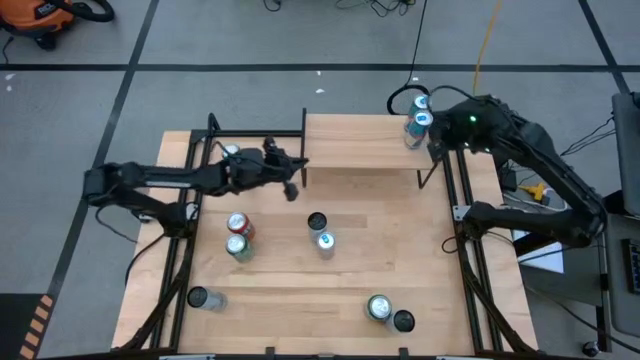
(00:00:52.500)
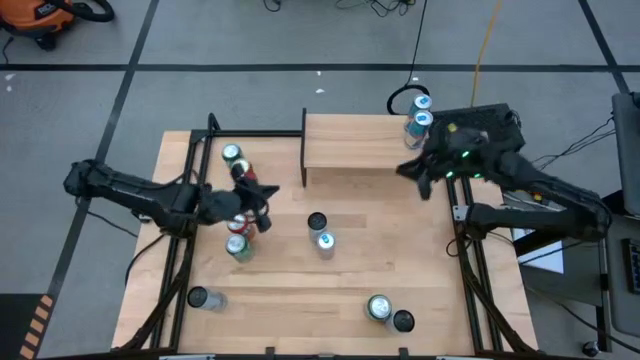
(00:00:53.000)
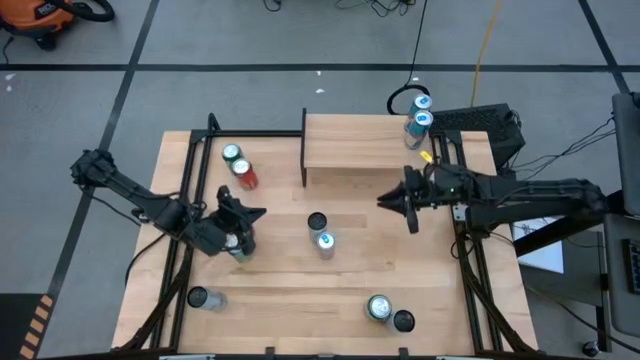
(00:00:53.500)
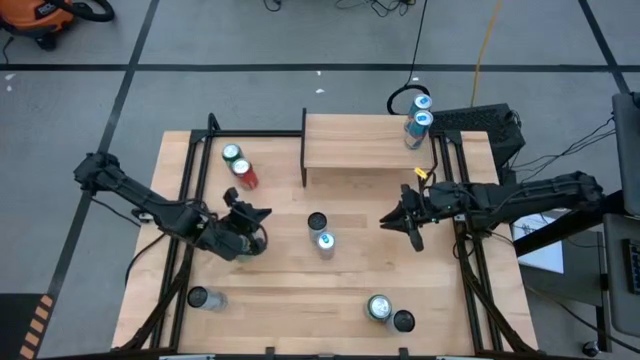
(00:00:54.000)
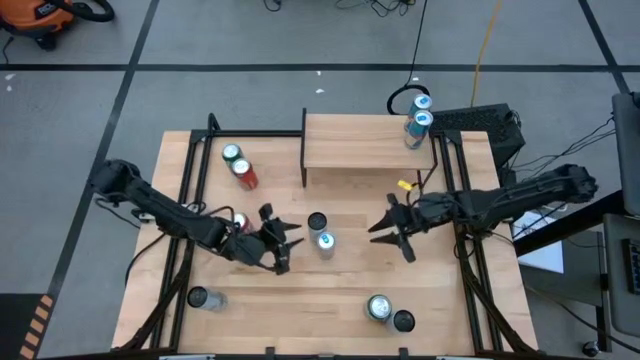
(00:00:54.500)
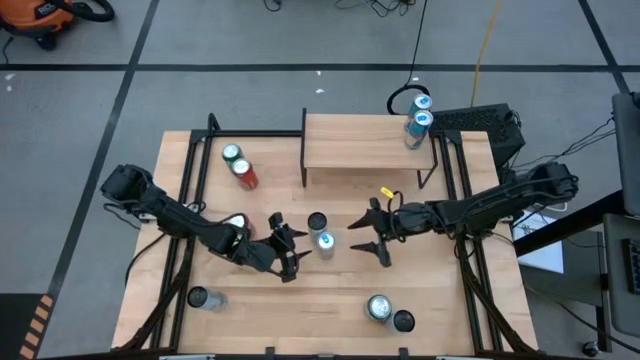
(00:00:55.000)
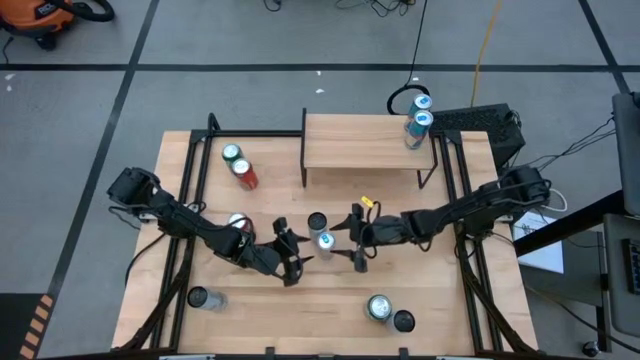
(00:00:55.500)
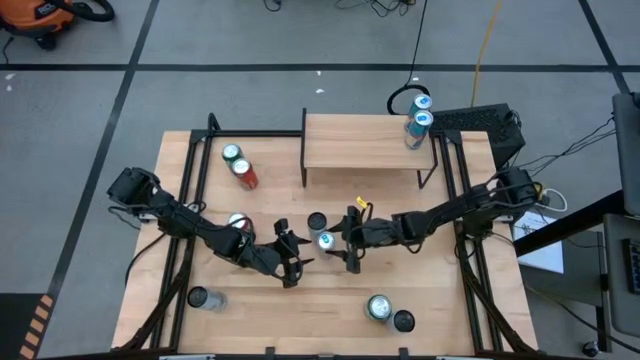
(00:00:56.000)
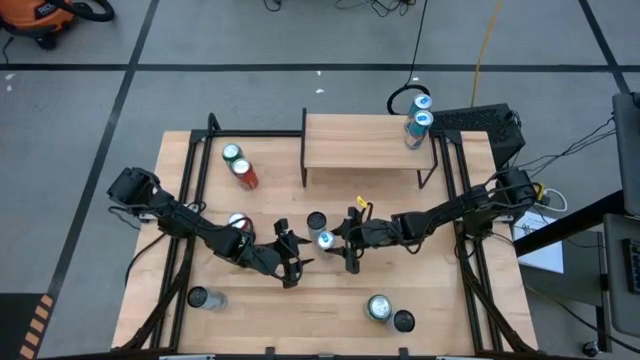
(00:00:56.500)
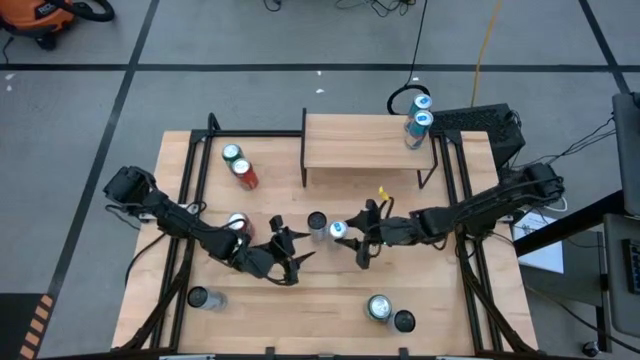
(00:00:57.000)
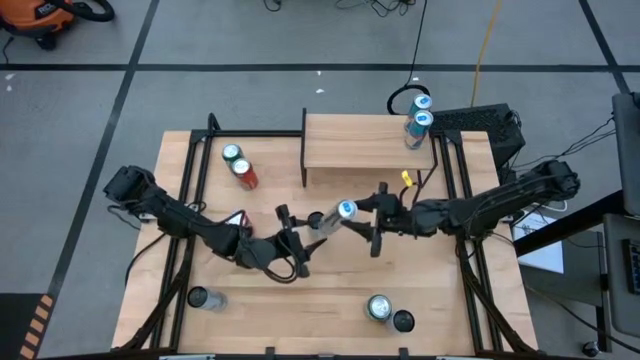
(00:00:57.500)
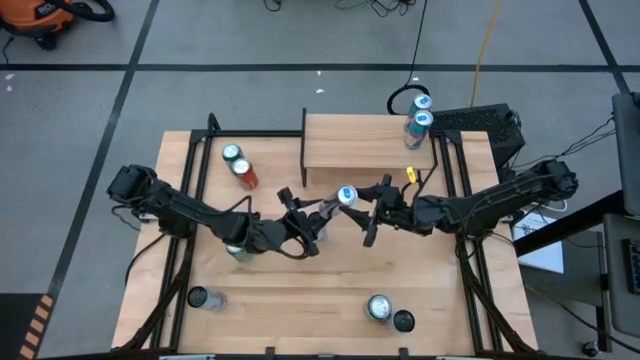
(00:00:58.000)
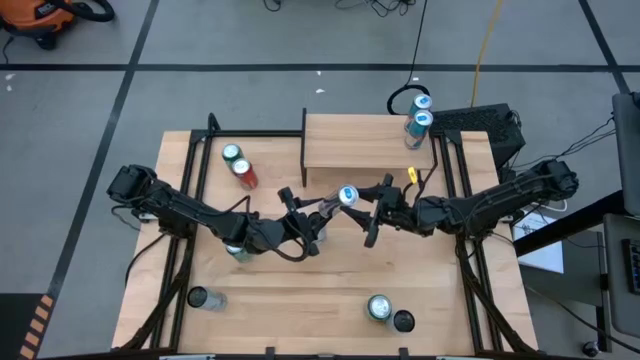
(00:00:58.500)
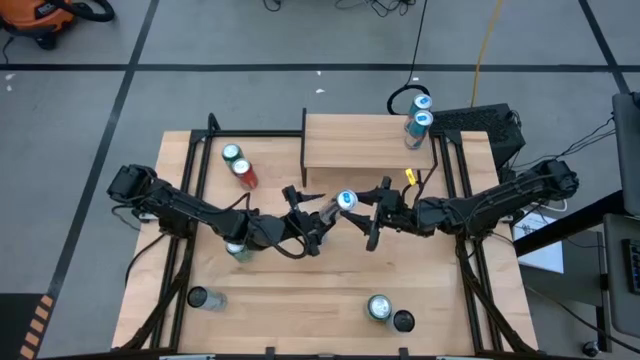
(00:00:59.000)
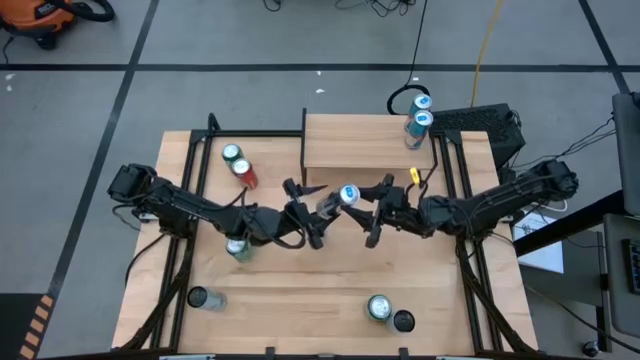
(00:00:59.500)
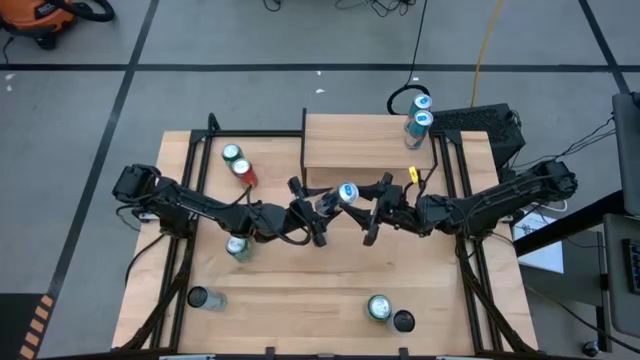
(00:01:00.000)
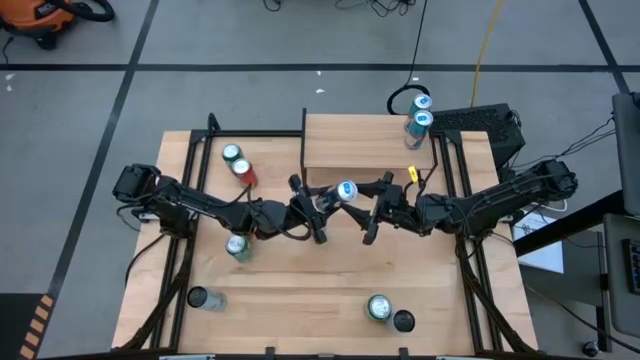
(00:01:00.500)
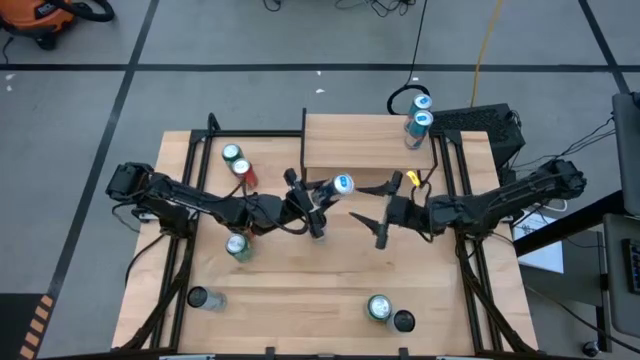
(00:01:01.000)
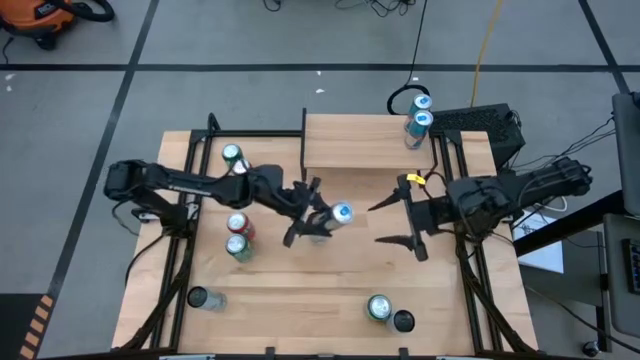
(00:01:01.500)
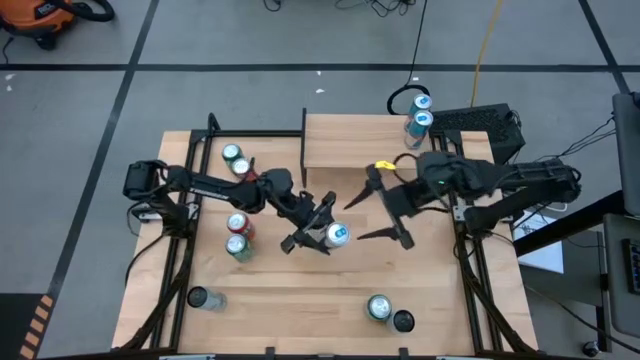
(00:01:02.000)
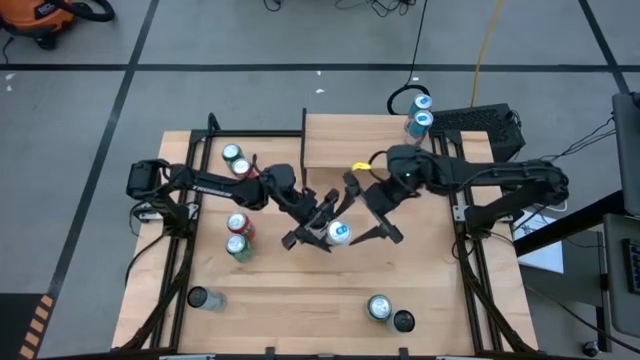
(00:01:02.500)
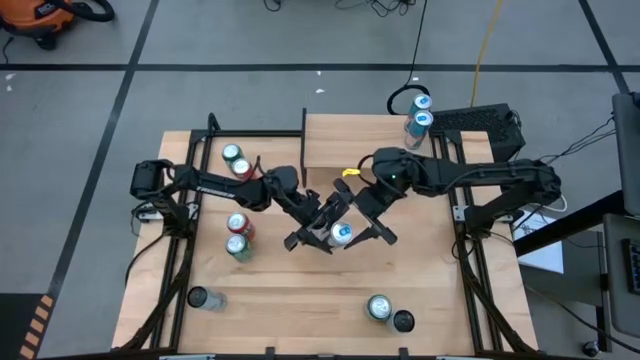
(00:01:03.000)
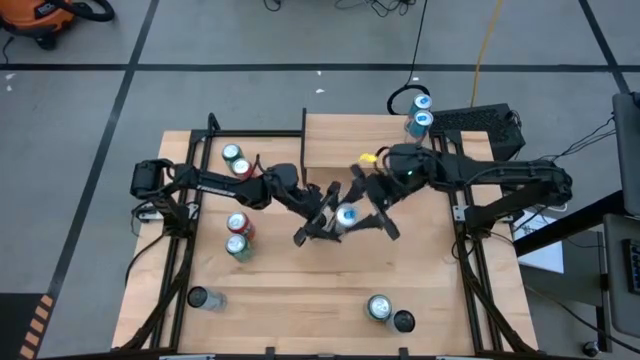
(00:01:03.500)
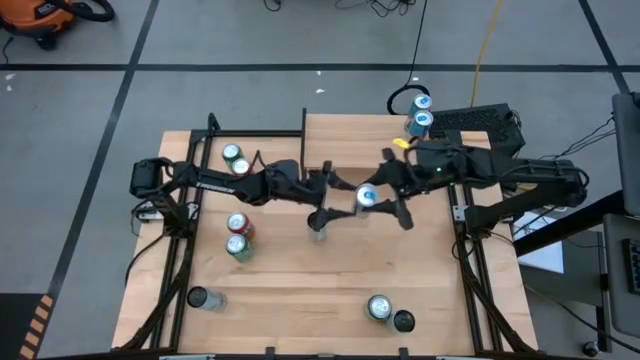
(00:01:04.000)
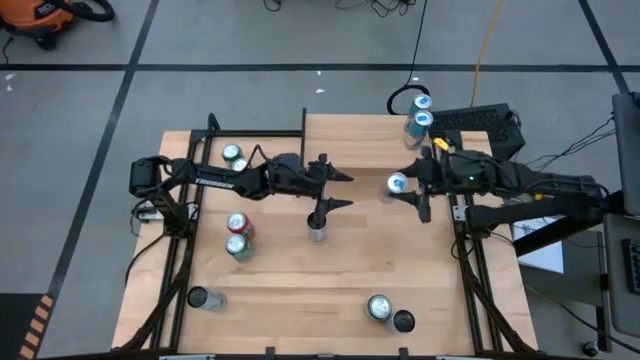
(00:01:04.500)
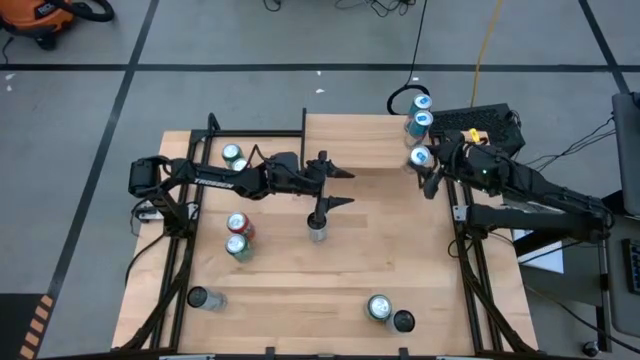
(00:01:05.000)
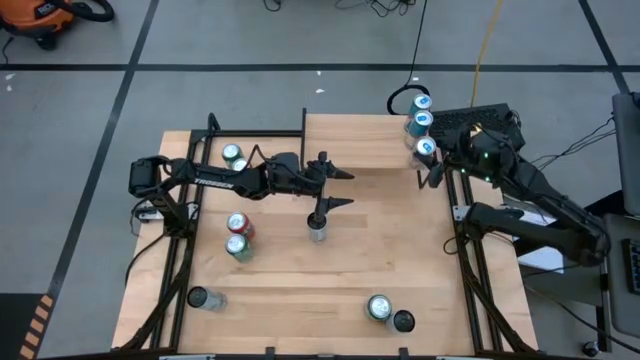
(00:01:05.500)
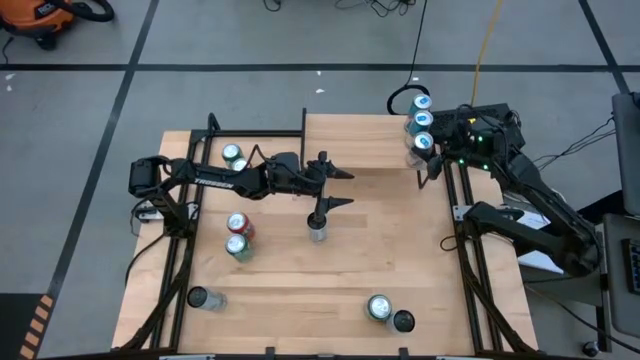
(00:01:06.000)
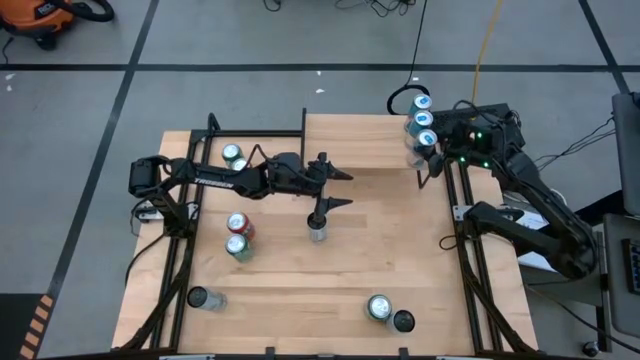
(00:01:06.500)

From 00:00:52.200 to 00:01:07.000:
Task: Place canned beverage on shelf
Put the blue soda can on the shelf aligned with the other blue soda can

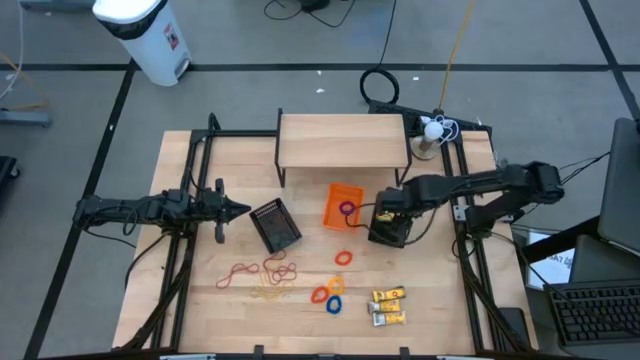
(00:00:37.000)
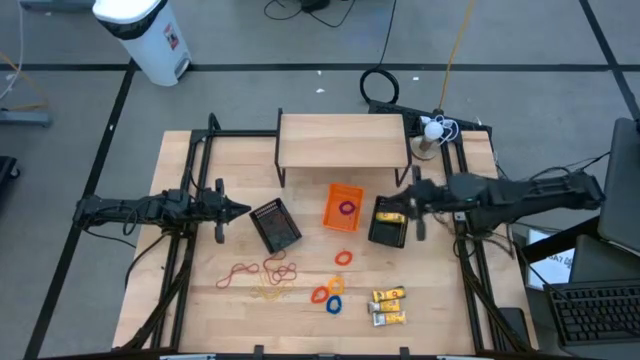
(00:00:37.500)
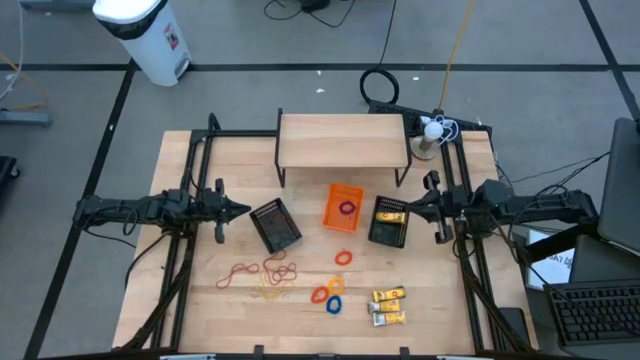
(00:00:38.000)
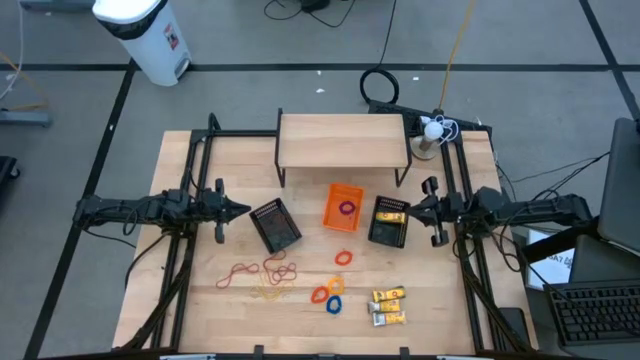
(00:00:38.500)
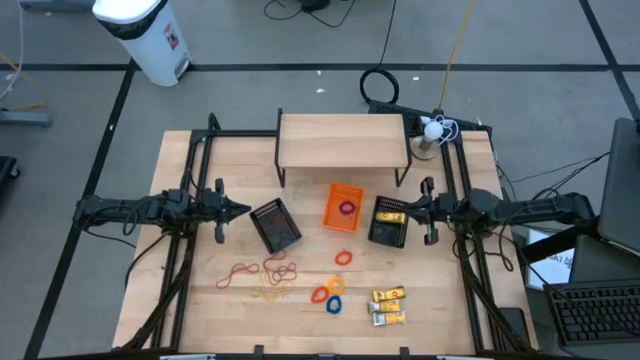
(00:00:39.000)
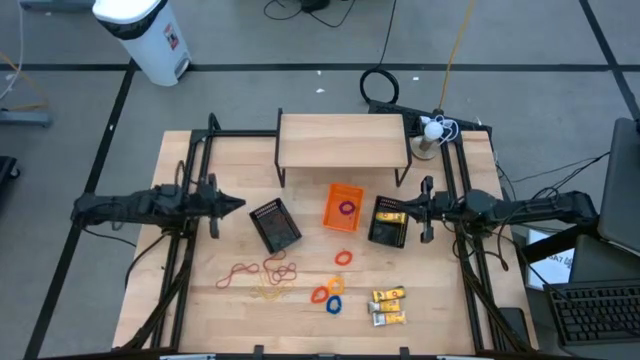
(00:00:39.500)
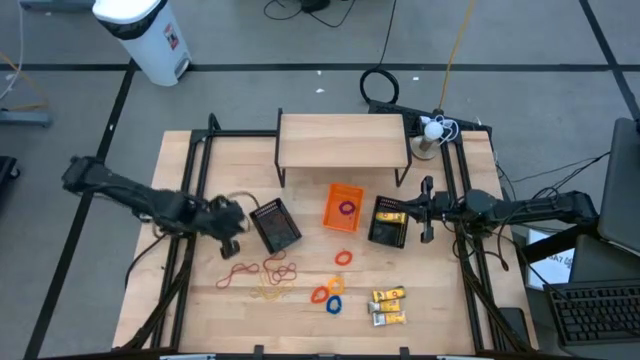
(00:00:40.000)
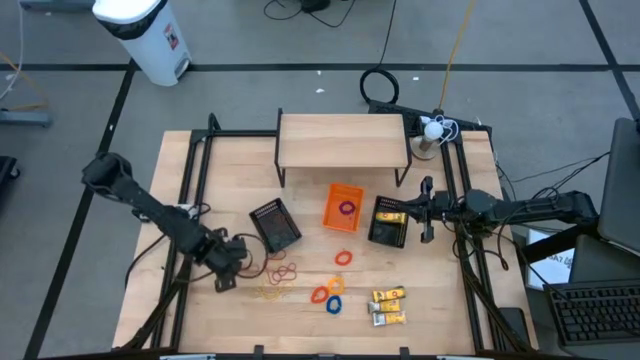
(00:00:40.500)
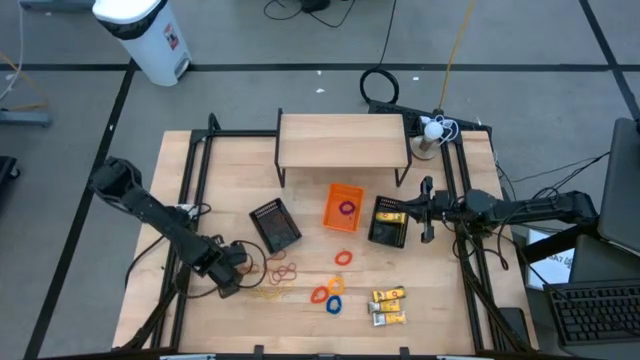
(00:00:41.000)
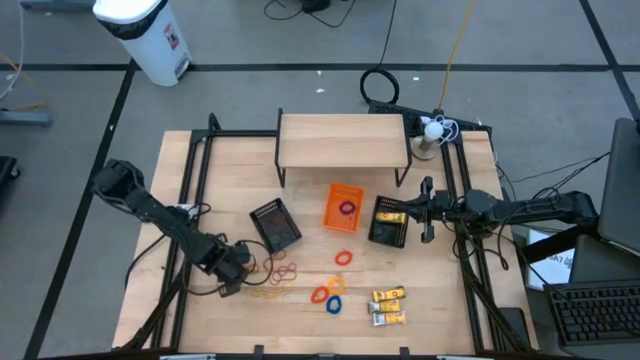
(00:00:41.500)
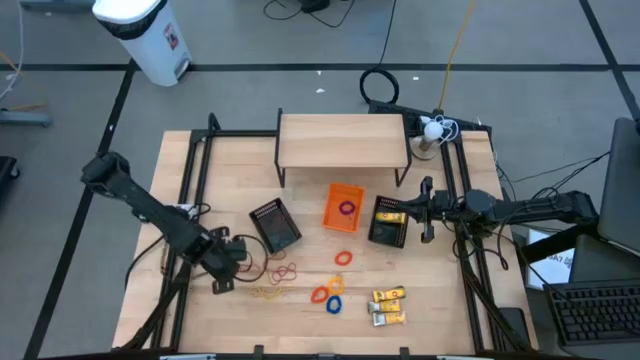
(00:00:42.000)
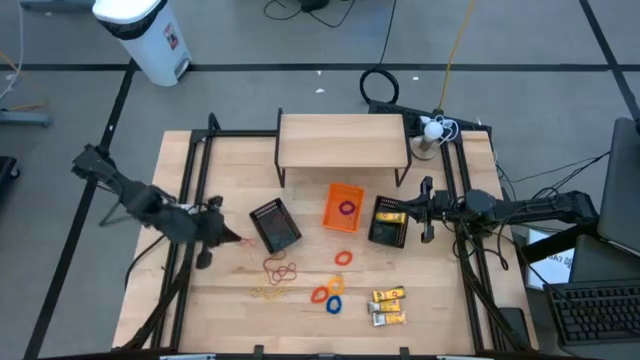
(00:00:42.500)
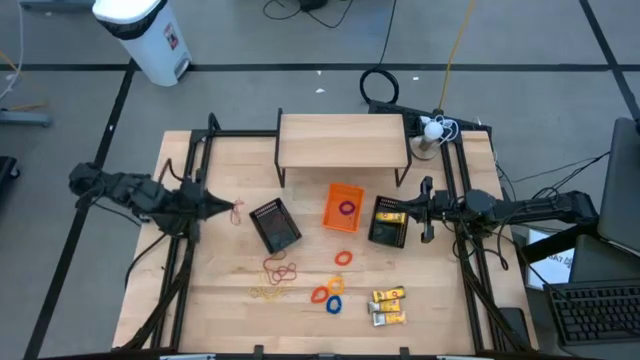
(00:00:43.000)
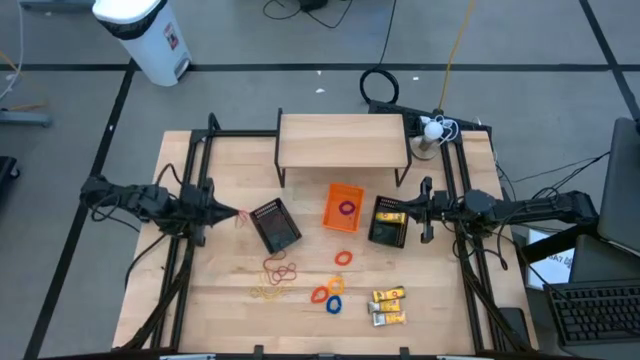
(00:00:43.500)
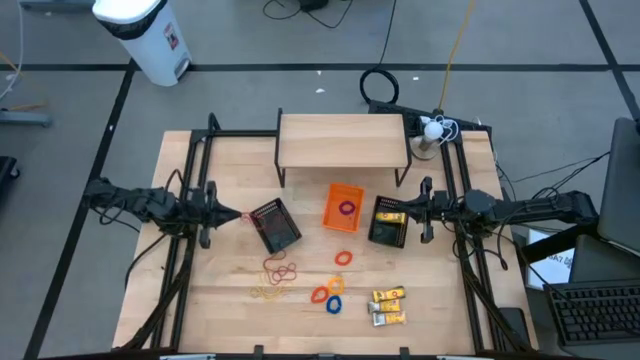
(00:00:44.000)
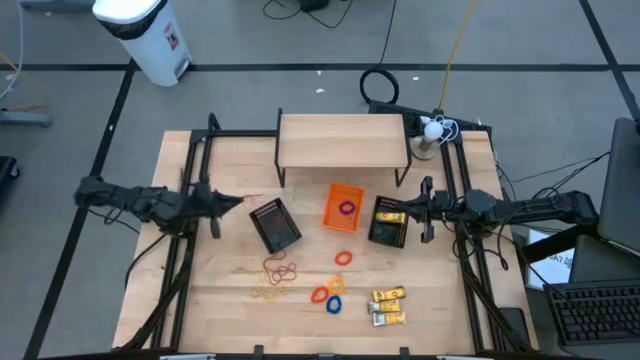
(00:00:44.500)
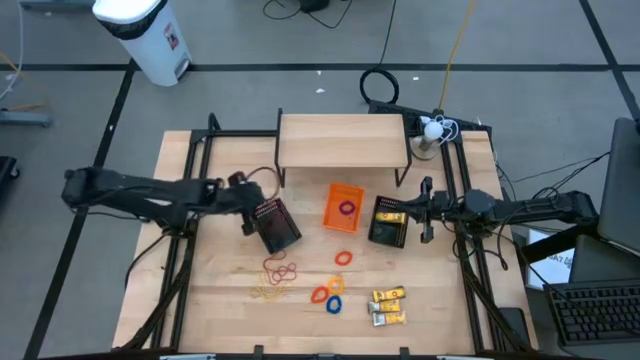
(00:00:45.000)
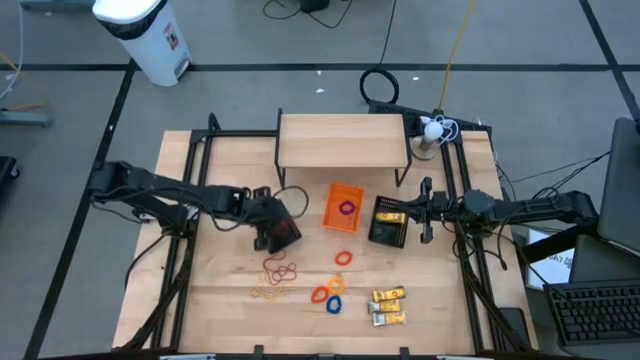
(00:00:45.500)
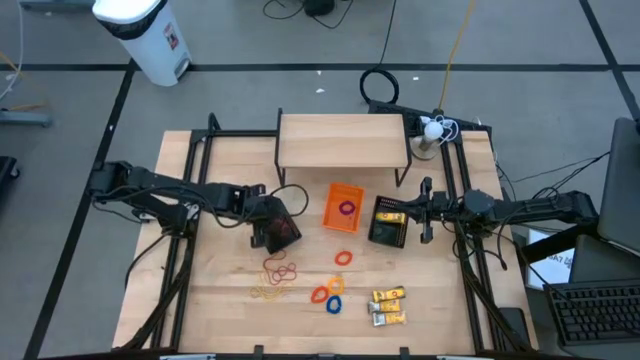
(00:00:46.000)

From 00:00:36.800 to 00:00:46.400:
Task: Pick & Place Office Desk Supplies
Put the red rubber band into the left black bin
